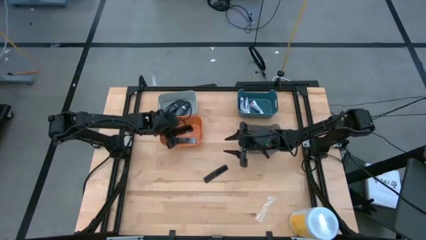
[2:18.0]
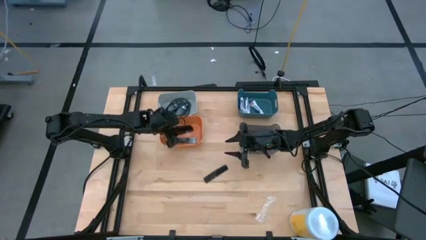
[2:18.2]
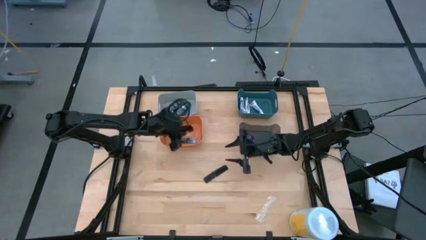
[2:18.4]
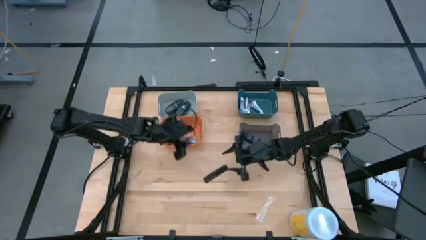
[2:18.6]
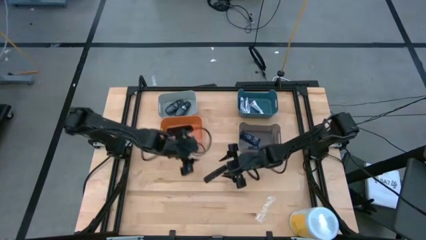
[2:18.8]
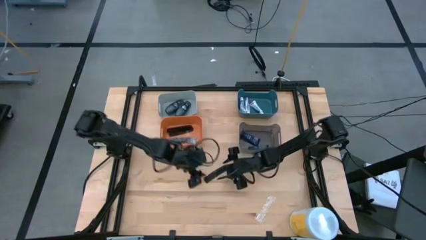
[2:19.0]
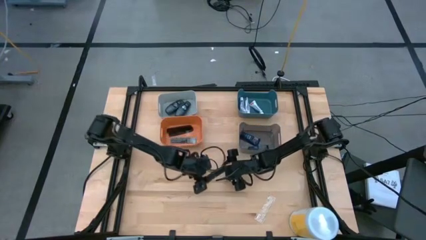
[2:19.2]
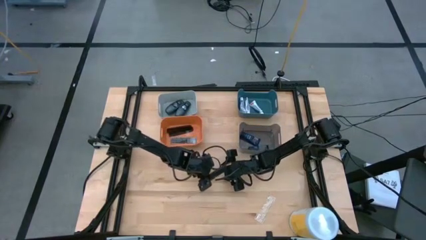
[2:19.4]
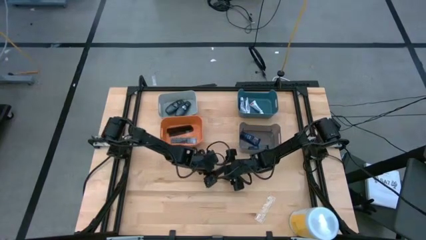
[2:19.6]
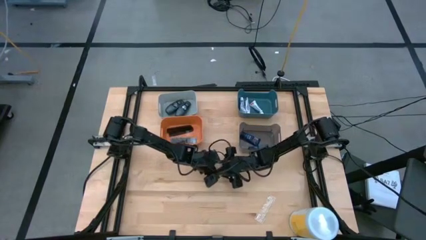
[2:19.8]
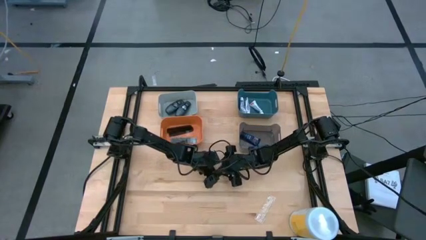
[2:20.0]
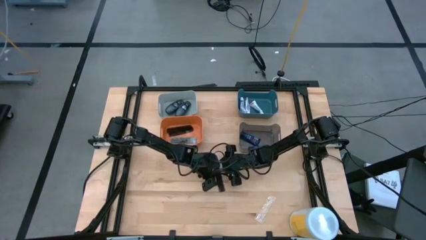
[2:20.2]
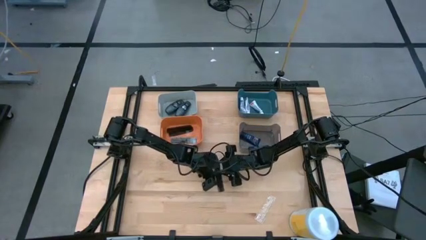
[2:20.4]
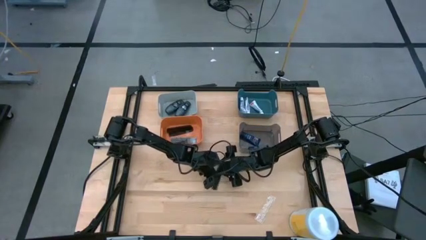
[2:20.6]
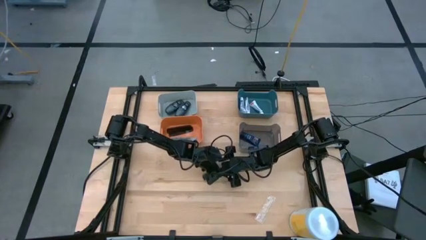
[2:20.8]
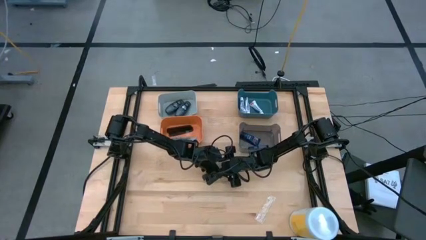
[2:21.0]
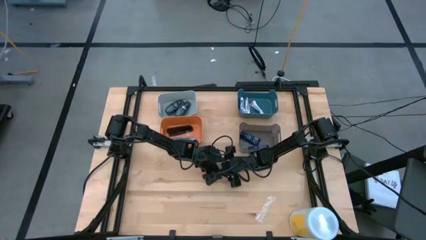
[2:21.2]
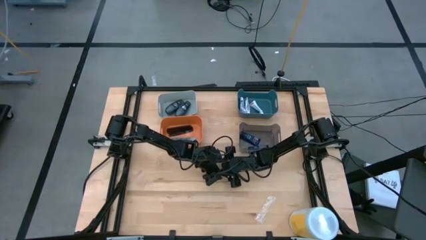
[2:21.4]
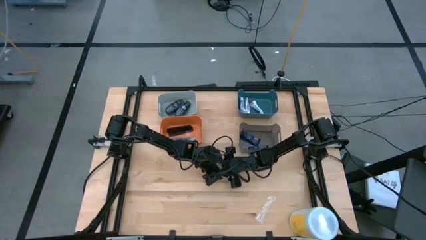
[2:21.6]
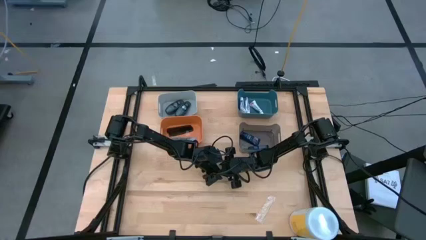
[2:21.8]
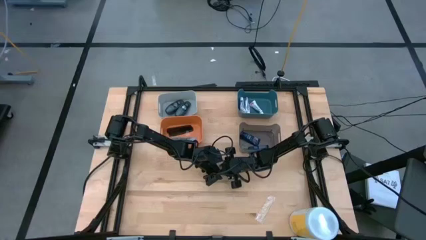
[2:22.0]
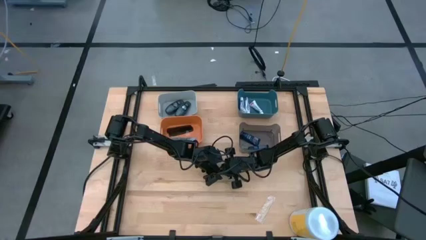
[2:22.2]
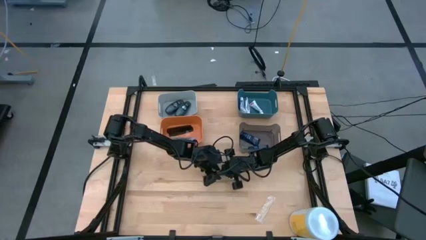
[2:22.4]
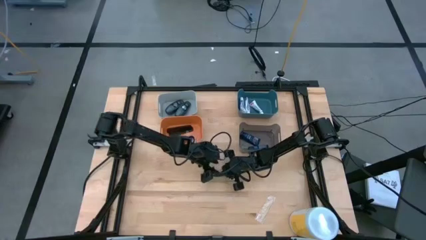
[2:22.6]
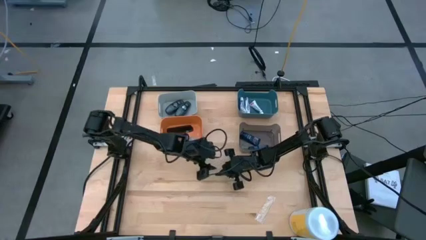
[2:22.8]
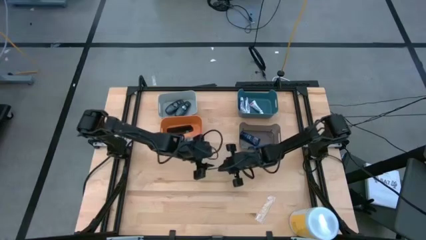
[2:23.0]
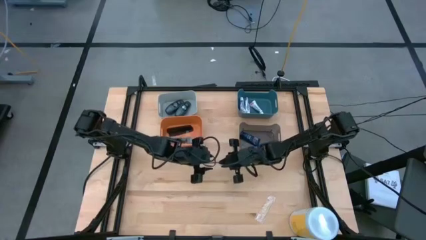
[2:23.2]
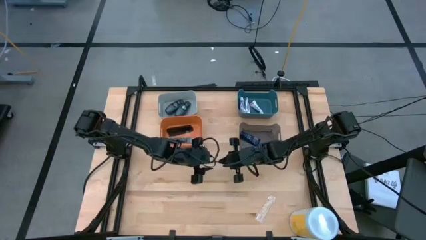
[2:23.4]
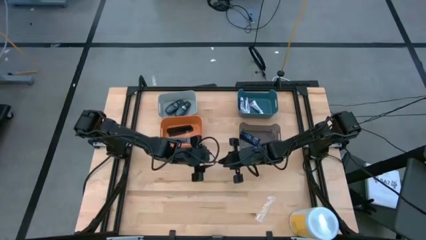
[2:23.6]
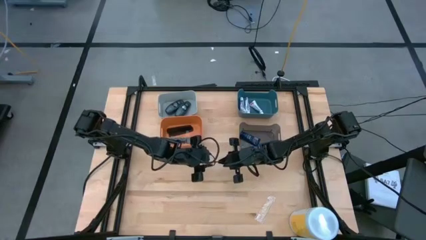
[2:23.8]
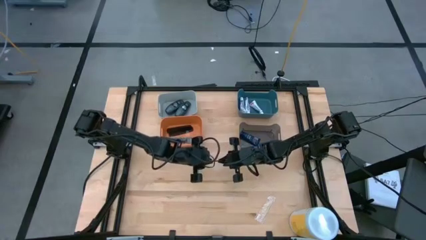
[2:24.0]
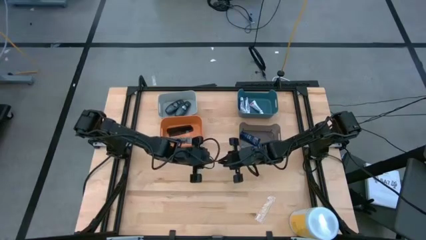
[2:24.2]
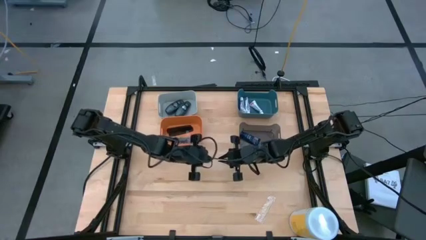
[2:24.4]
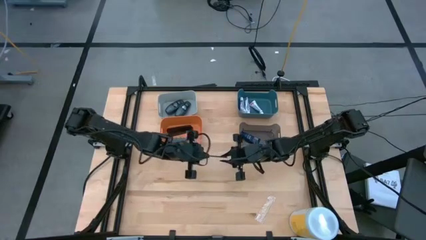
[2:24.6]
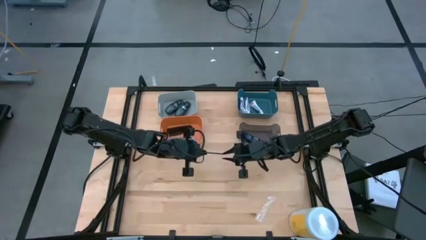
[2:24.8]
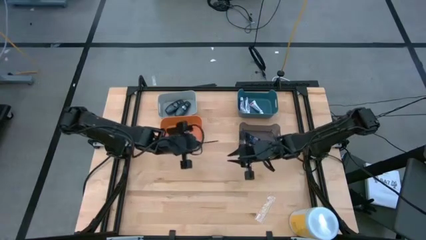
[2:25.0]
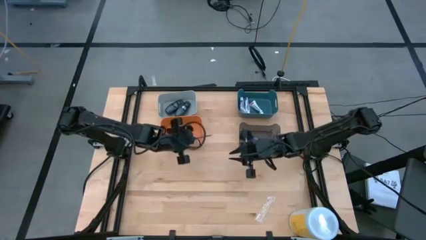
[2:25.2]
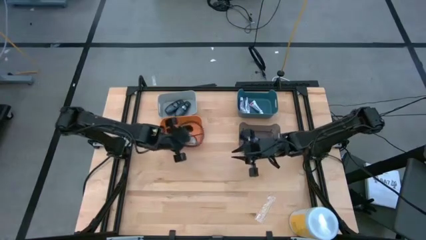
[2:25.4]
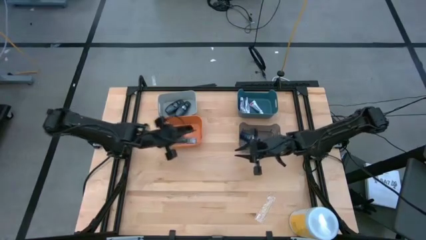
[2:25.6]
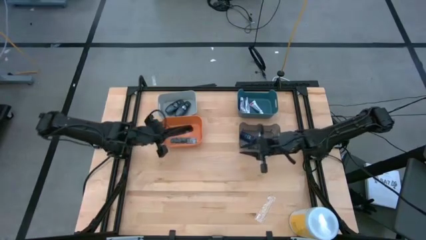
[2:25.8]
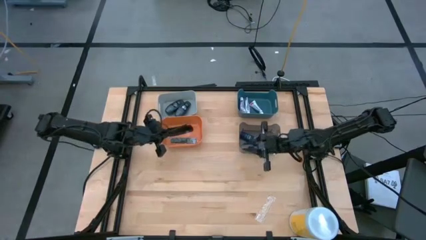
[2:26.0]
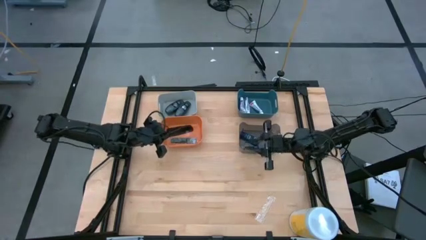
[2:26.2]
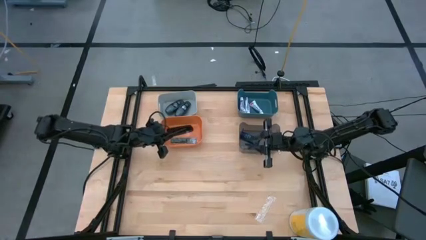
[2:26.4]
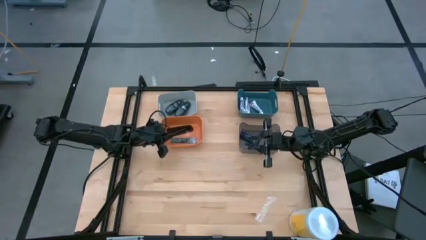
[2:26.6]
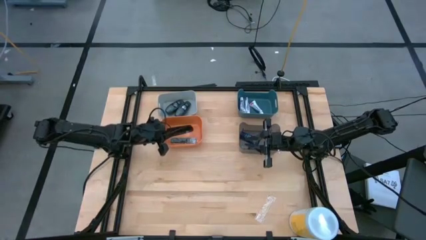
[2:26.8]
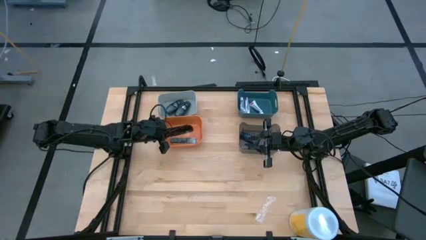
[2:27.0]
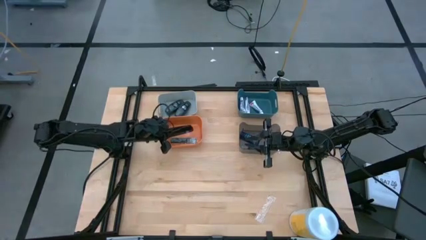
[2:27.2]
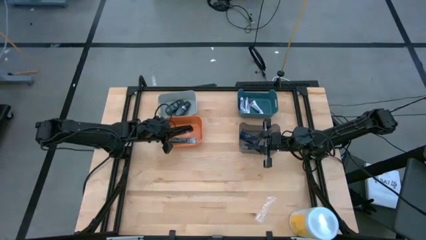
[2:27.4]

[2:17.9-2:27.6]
Task: Pick & Place Travel size toiletries
Put the black comb into the orange bin

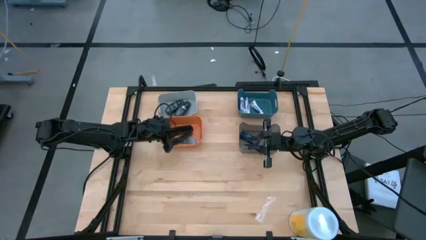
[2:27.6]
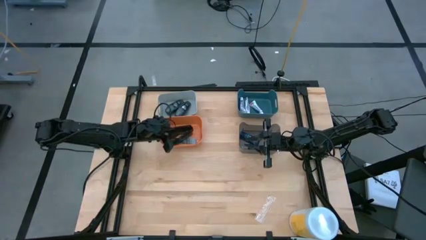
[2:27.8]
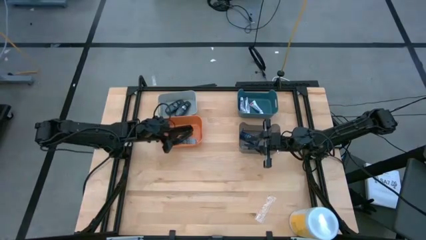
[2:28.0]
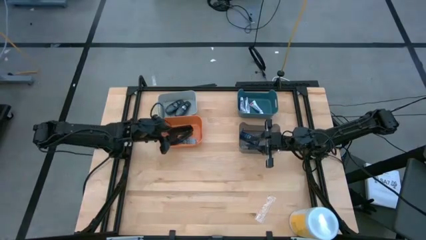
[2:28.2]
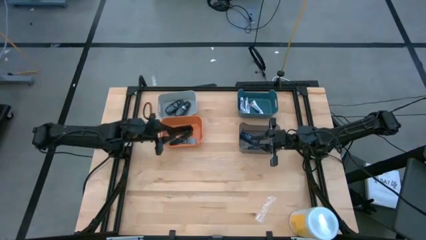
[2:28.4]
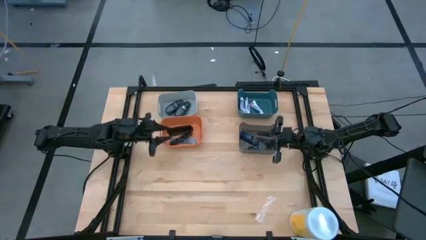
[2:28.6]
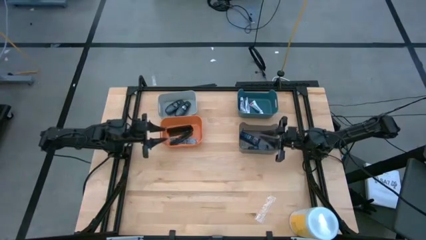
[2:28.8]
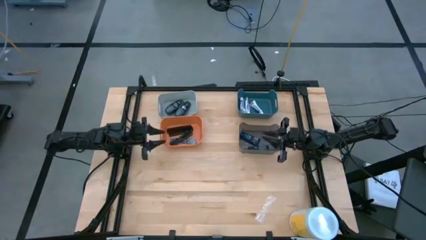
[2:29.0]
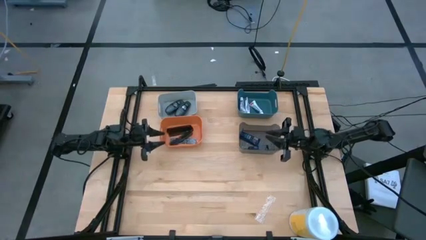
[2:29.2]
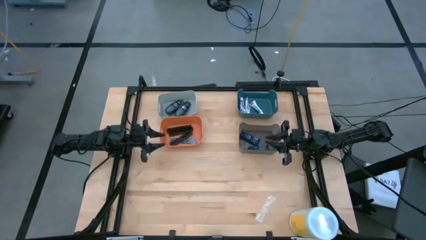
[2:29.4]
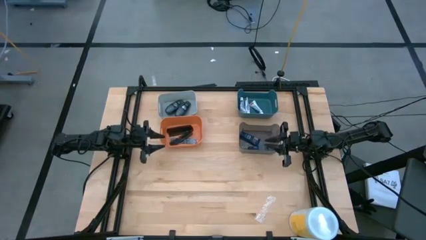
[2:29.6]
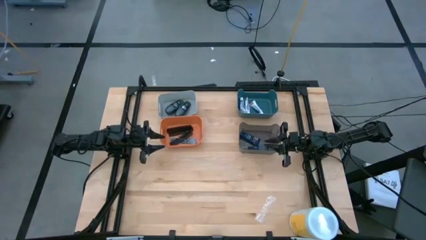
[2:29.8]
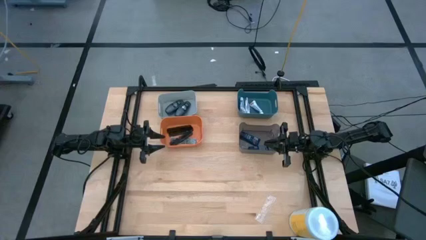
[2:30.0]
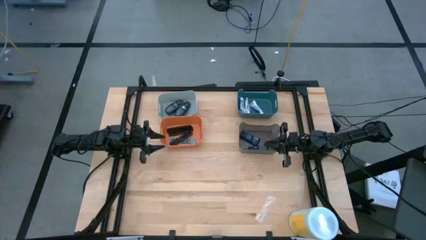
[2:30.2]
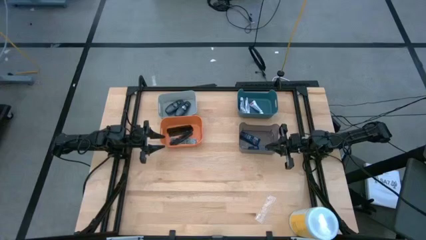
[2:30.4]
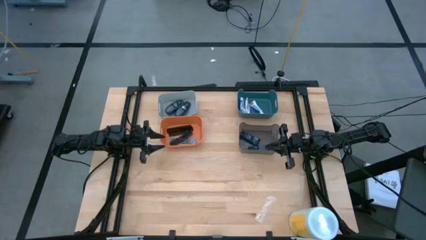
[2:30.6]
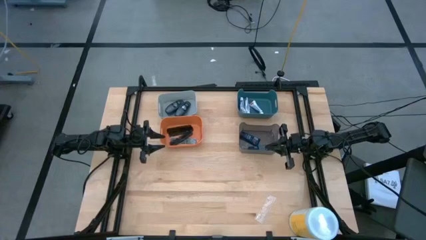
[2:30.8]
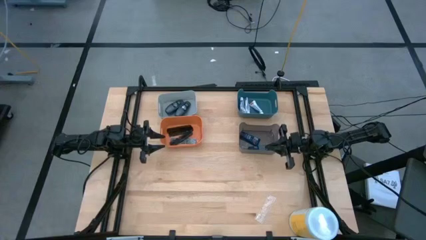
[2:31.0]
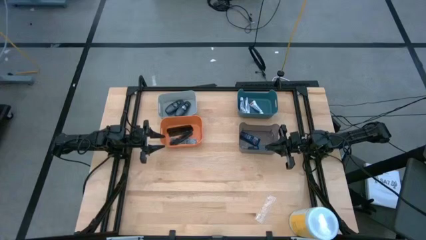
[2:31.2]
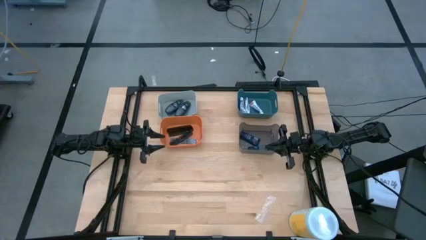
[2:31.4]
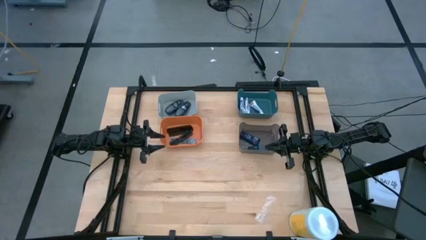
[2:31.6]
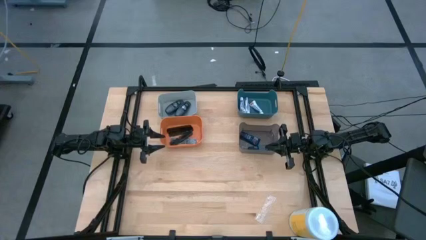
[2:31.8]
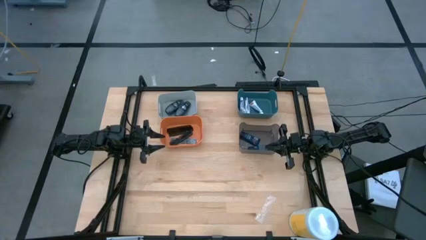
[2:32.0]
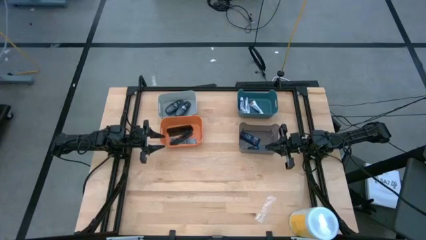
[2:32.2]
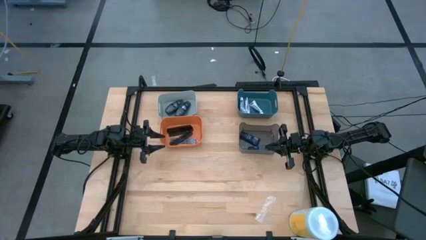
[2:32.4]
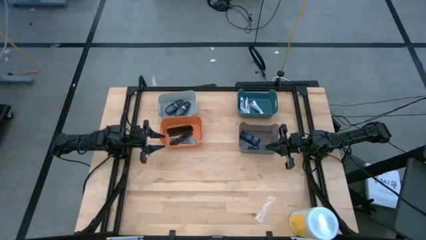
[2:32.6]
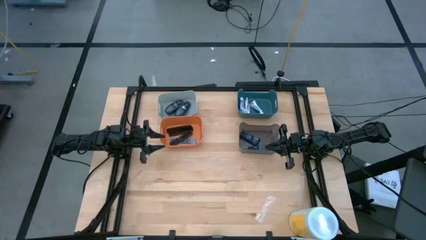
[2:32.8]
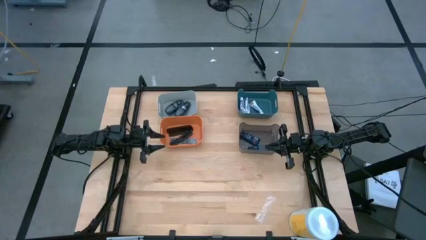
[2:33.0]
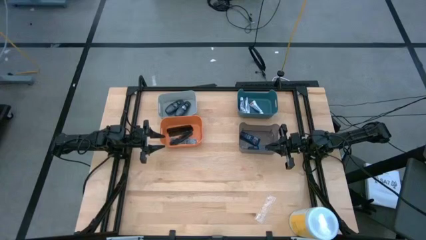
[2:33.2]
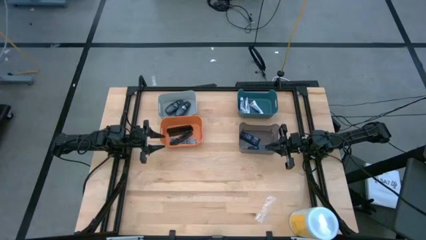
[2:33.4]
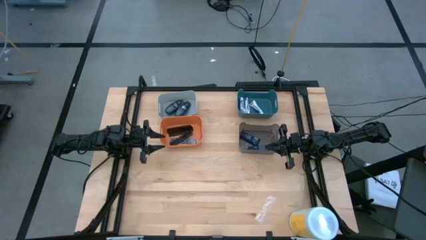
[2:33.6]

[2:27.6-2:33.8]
Return to Home Position

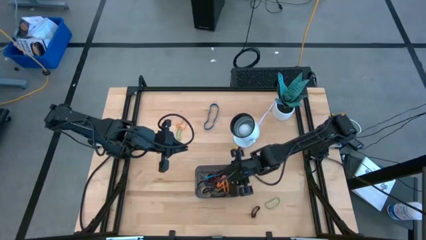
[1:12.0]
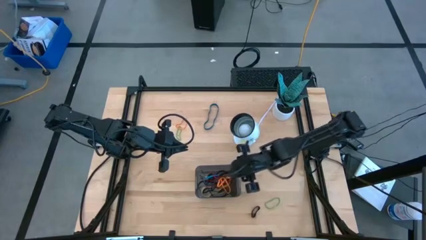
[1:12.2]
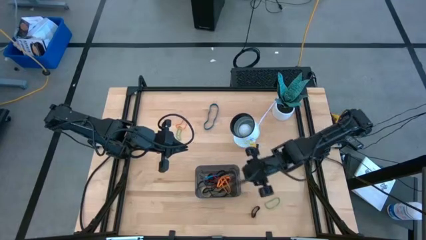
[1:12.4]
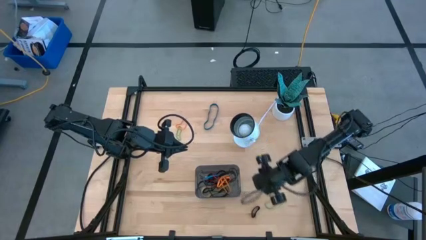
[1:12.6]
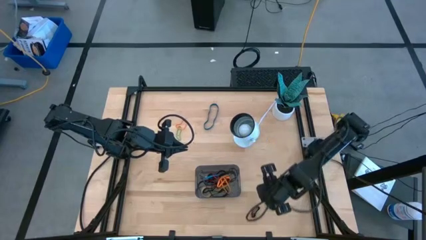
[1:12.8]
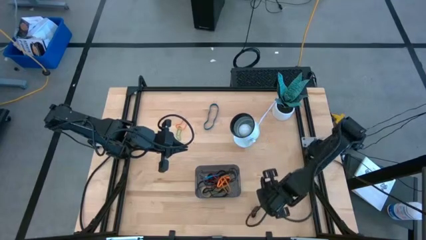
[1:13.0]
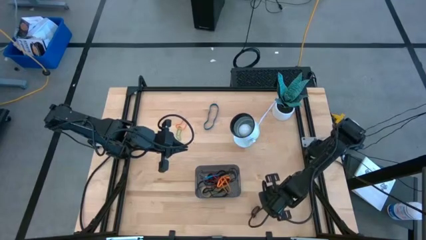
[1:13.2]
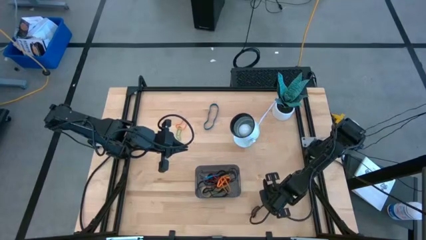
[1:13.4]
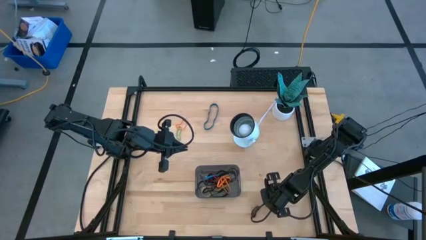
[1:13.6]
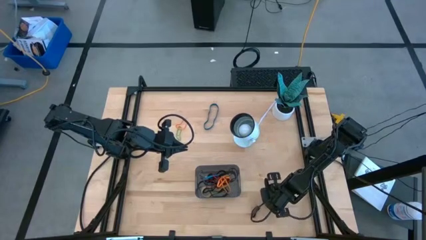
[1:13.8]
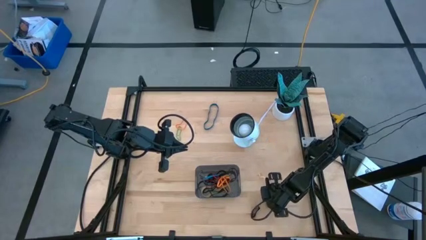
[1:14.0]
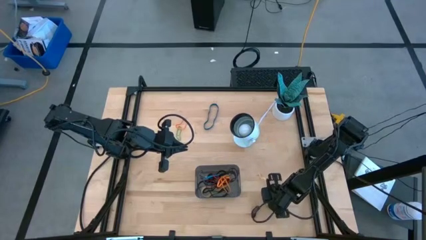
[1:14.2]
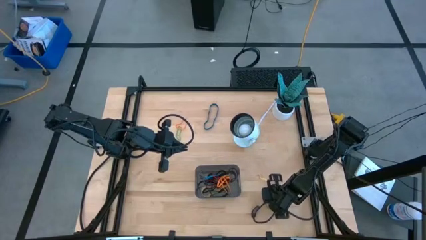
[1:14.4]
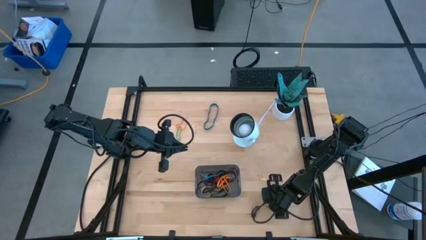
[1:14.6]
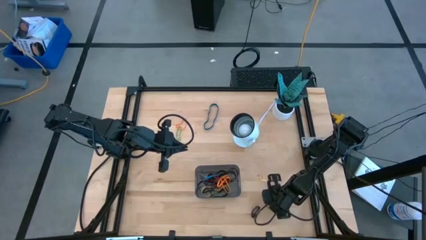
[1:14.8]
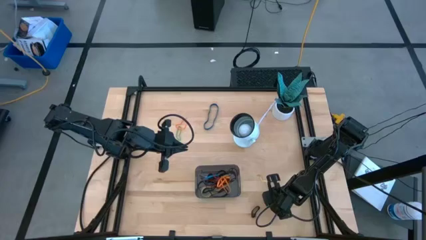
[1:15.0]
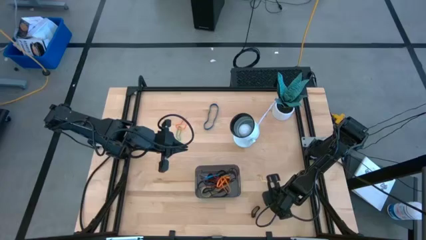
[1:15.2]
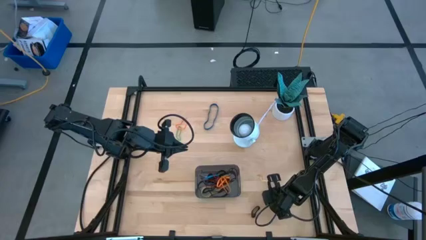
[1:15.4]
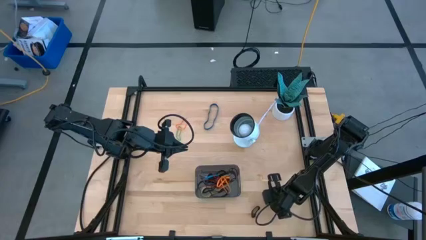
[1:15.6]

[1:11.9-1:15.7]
Task: Pick and place rubber bands into bin
Put the bottom green rubber band into the black bin
